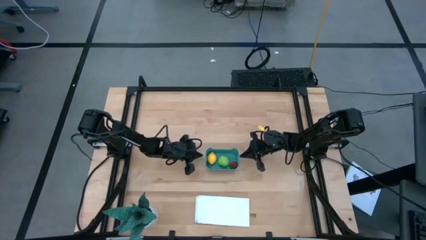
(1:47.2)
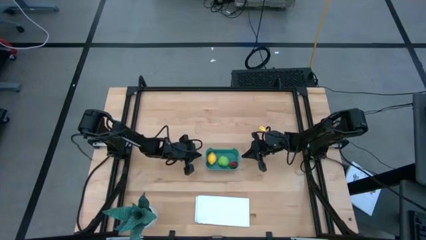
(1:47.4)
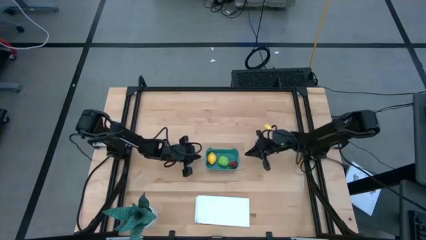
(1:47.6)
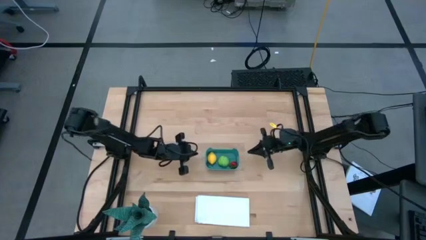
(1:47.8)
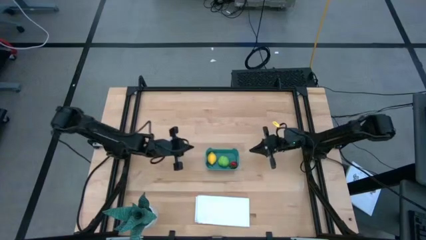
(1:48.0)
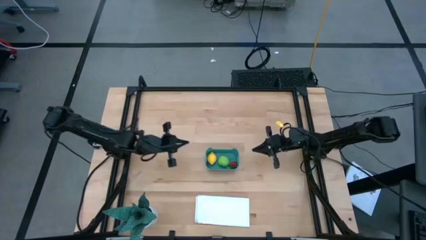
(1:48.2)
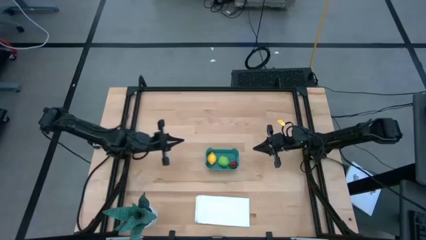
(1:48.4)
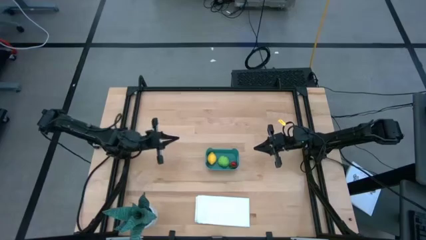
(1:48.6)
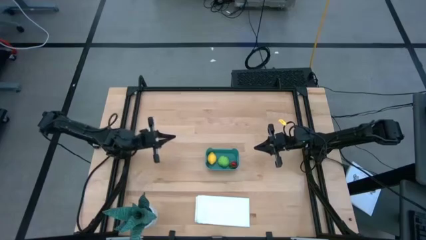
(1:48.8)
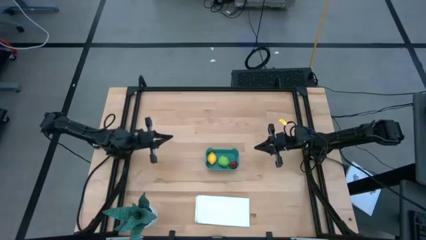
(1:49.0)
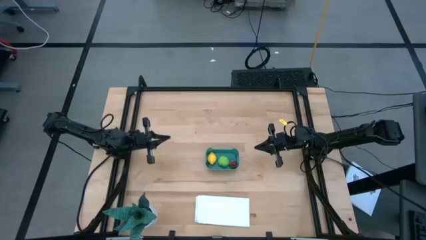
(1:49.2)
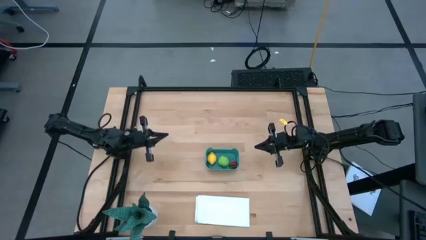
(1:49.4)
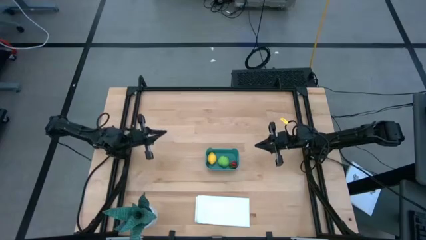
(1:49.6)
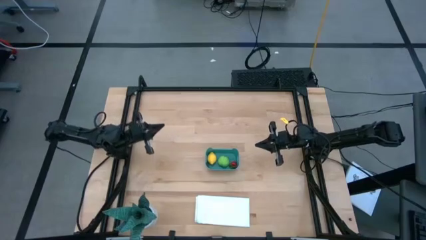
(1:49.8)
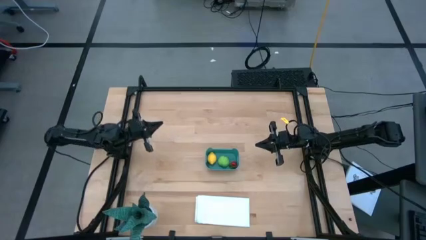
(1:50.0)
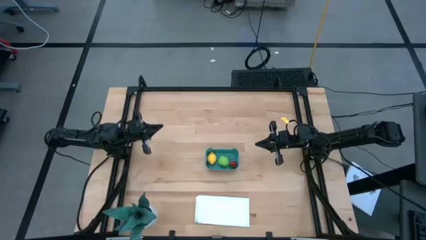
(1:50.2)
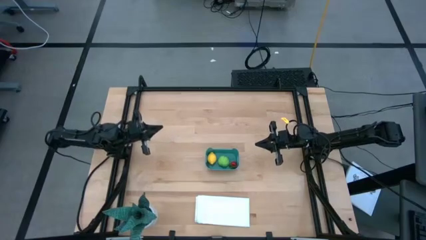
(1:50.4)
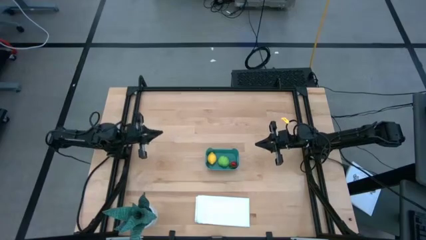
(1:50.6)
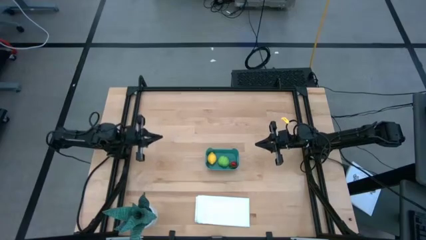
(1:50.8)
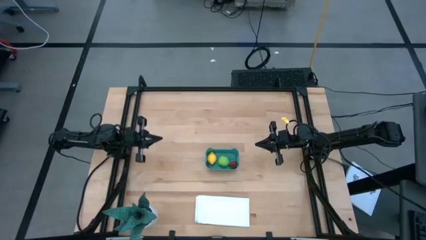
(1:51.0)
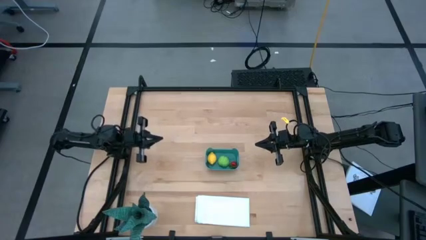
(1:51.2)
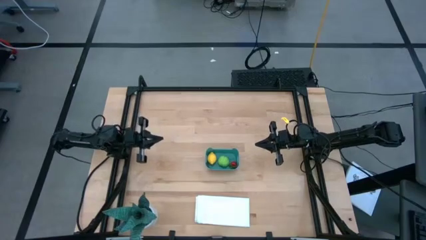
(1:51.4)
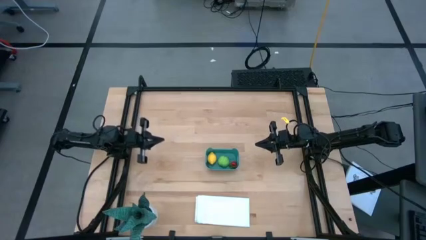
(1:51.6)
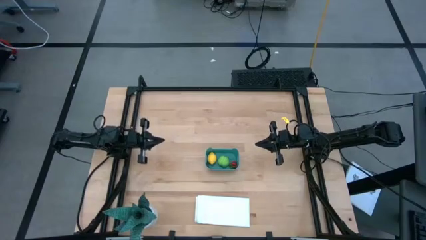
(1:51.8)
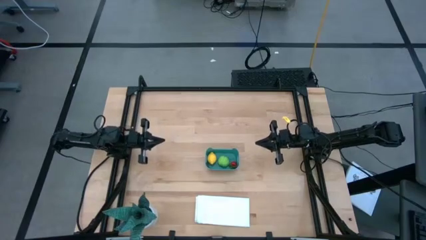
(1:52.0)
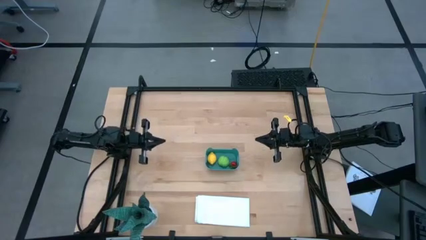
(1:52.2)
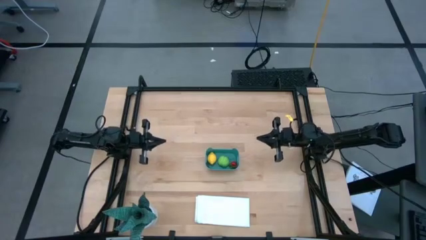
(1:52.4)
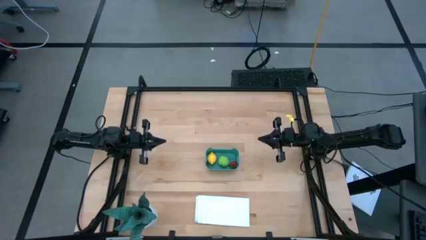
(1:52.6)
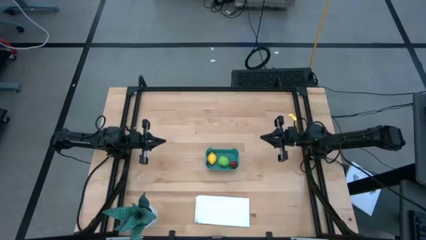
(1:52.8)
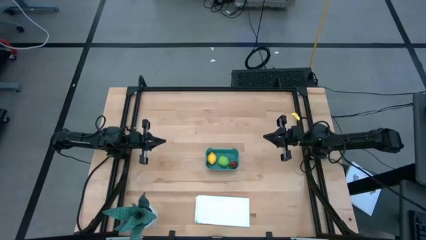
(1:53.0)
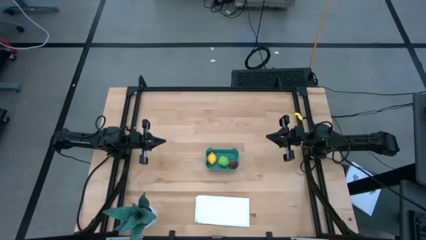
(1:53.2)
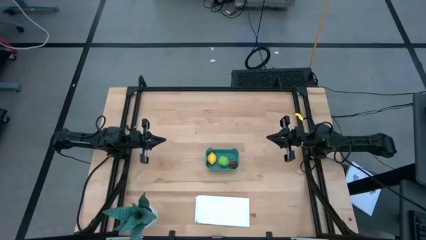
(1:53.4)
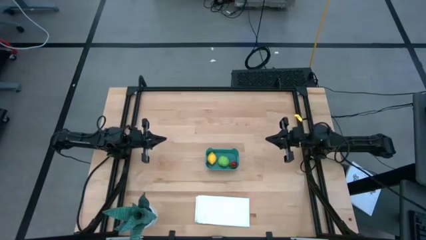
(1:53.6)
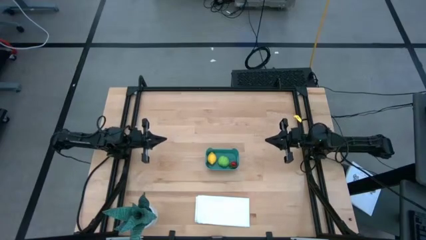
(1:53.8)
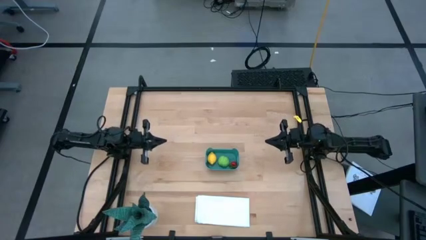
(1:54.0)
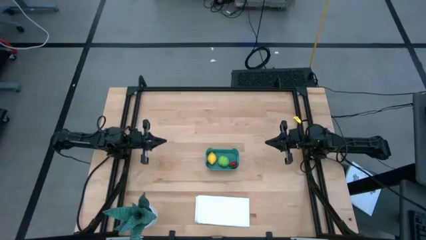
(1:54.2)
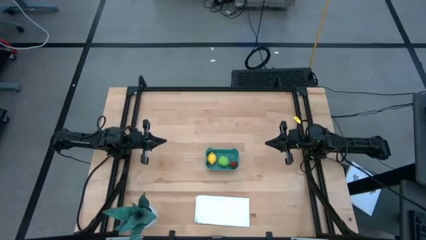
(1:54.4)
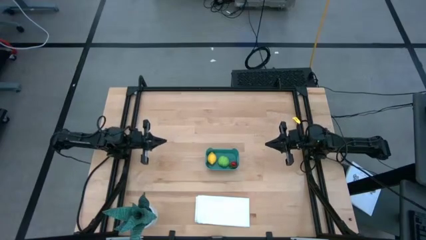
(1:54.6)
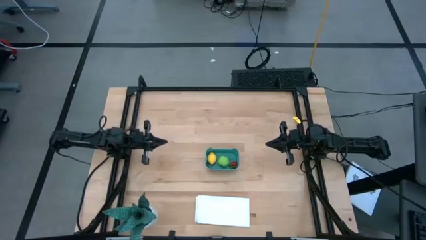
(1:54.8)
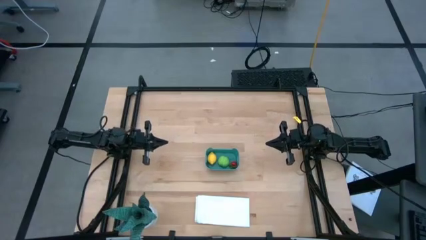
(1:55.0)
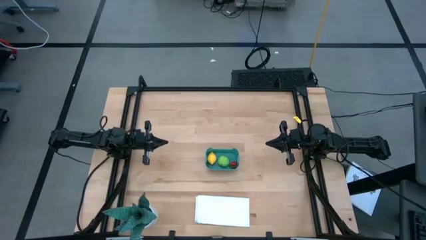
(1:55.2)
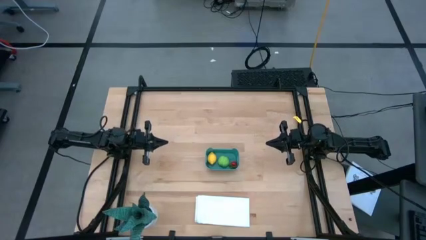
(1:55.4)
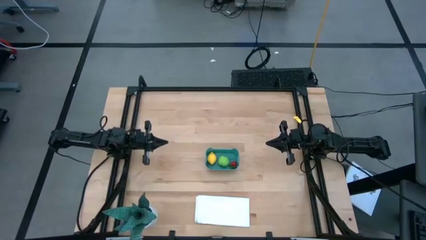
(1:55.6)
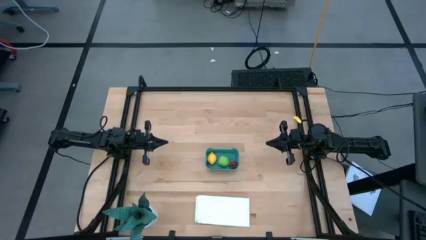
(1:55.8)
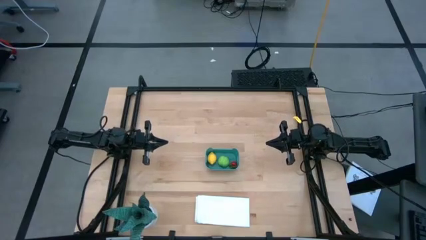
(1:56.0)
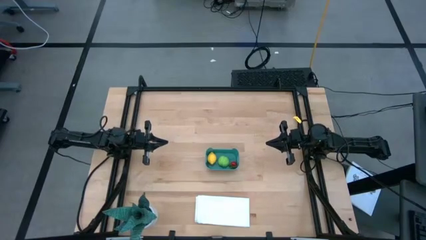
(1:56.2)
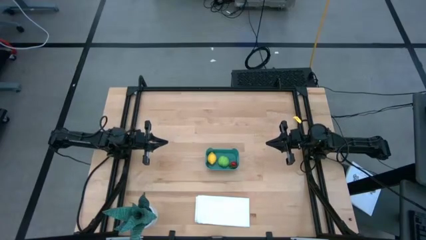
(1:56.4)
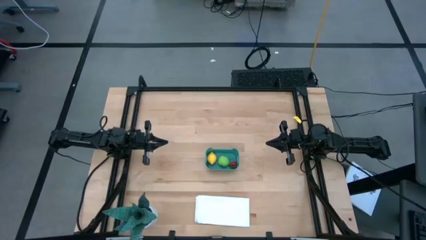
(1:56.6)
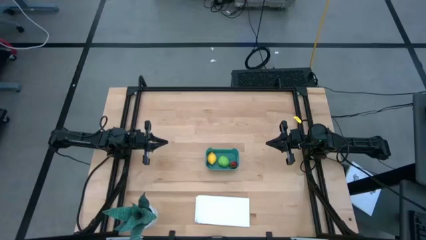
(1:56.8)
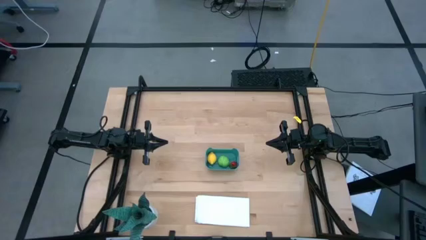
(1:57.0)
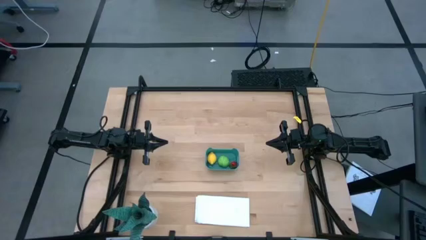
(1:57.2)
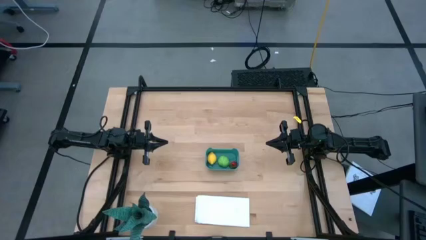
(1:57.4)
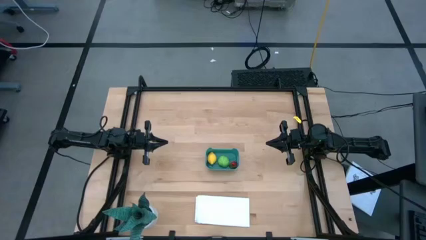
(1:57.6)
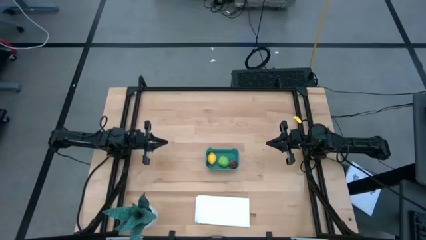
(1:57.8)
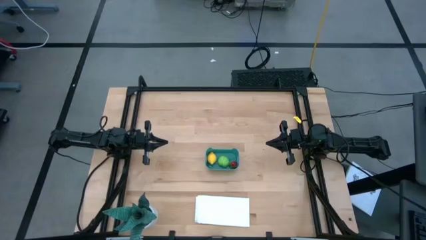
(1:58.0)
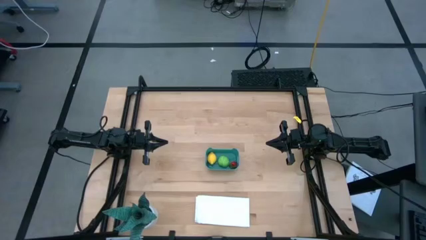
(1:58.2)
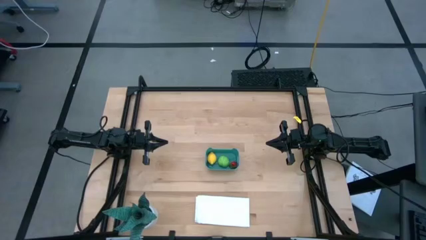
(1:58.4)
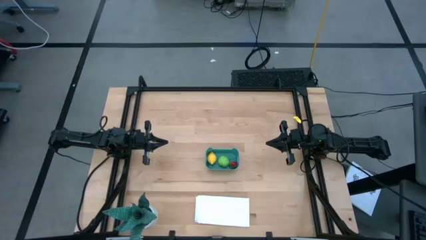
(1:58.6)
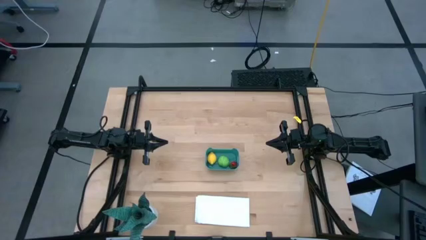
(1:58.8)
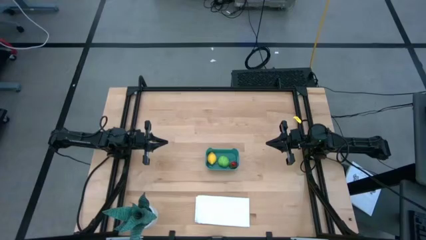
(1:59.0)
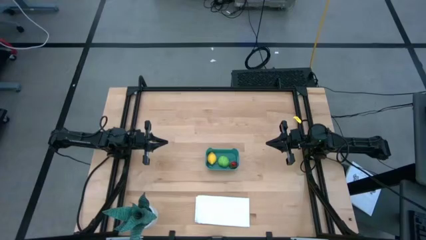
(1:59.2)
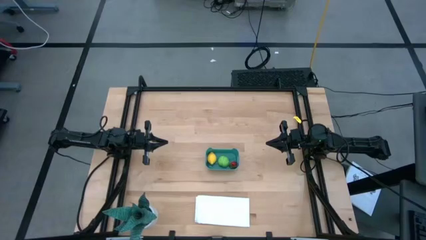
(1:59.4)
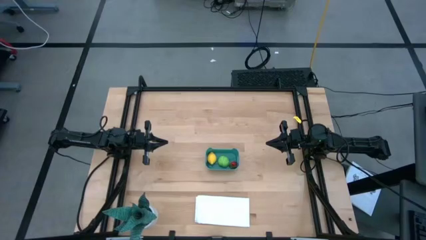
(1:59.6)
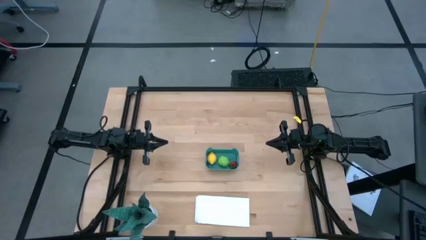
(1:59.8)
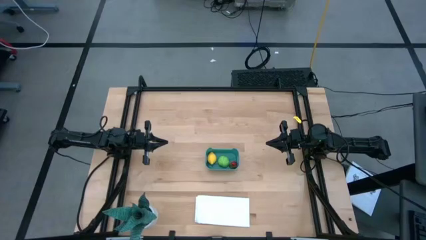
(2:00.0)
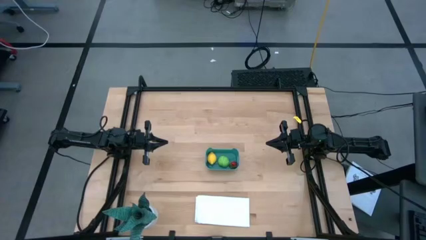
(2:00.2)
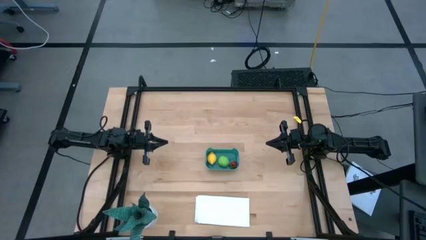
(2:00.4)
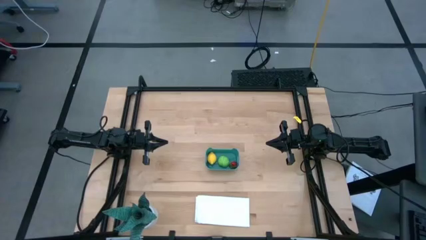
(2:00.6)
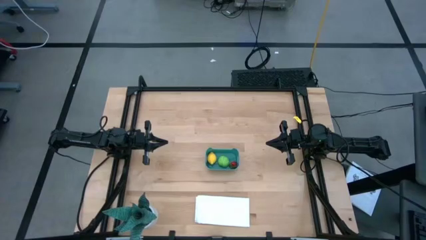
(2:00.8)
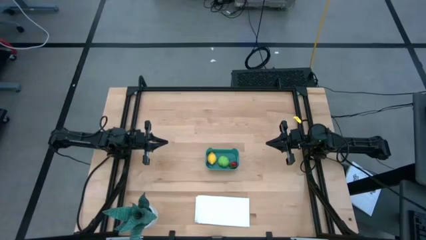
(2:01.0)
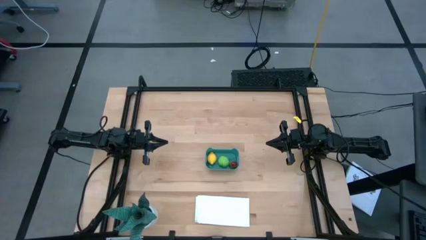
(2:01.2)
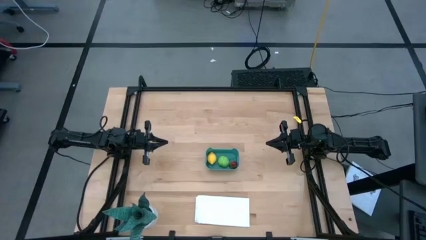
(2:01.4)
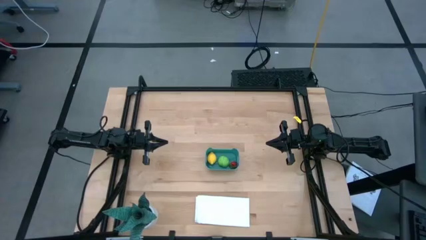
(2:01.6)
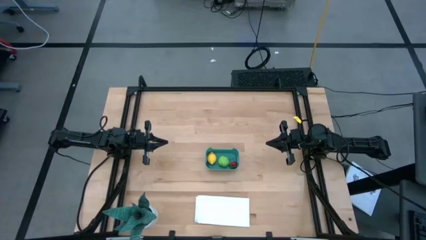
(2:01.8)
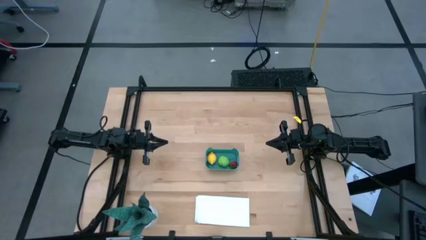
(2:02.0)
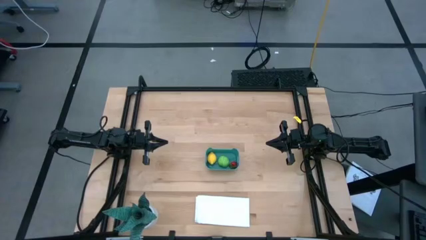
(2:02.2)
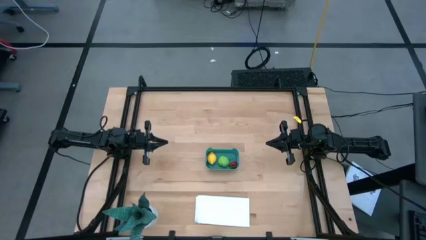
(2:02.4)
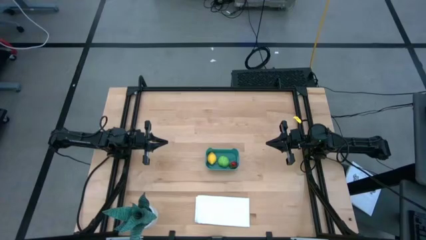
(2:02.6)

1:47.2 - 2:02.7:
Task: Pick and placing Produce into tupperware
Return to Home Position
